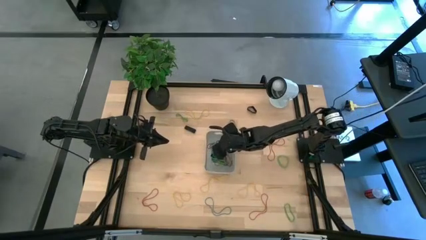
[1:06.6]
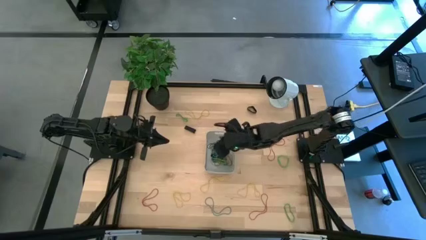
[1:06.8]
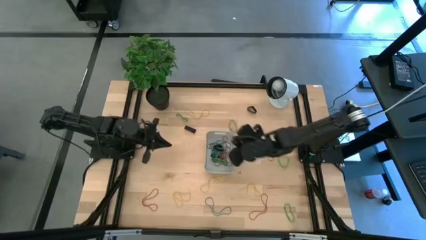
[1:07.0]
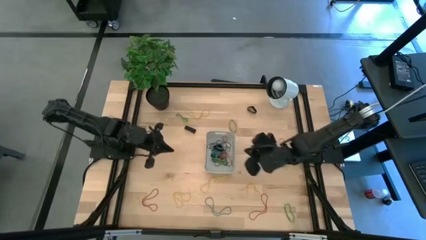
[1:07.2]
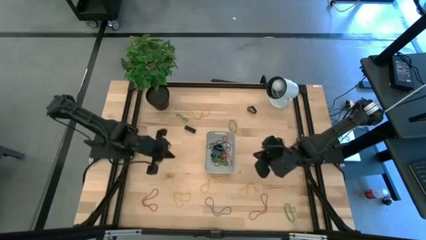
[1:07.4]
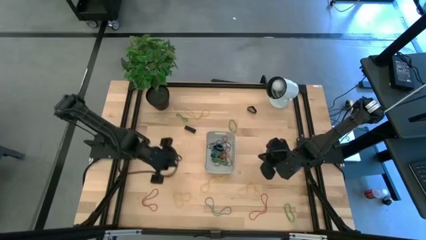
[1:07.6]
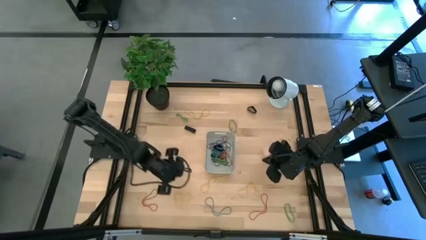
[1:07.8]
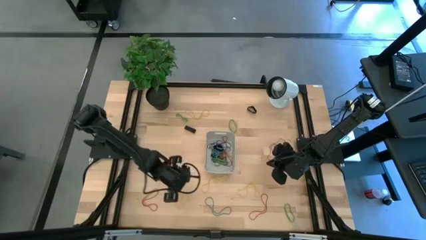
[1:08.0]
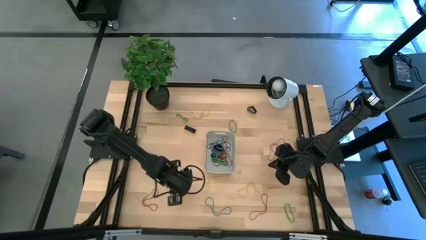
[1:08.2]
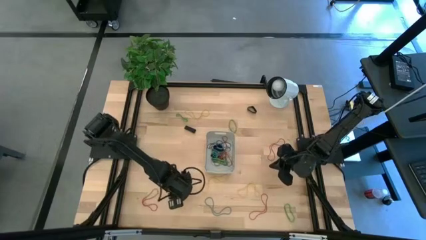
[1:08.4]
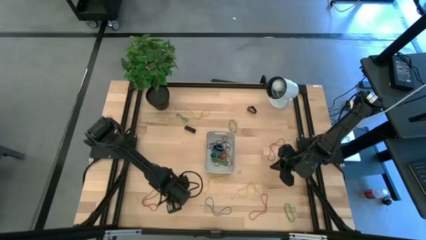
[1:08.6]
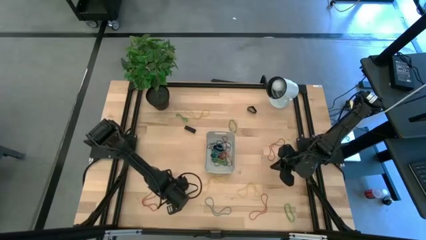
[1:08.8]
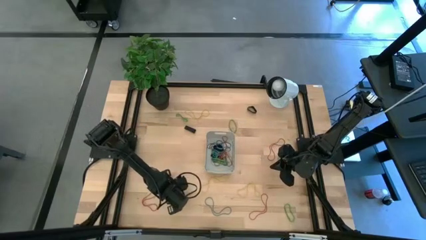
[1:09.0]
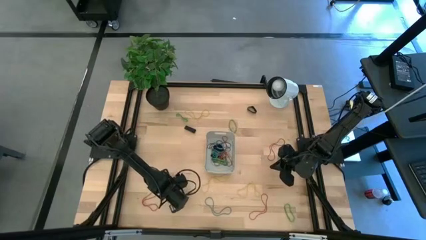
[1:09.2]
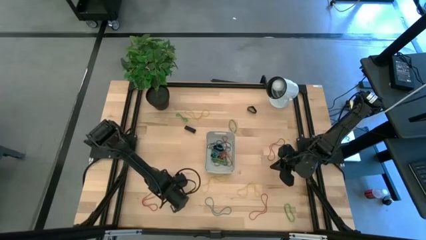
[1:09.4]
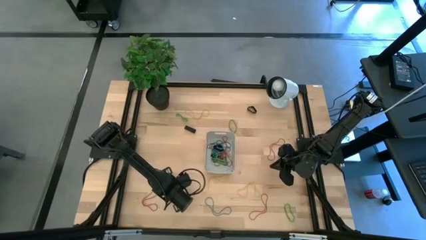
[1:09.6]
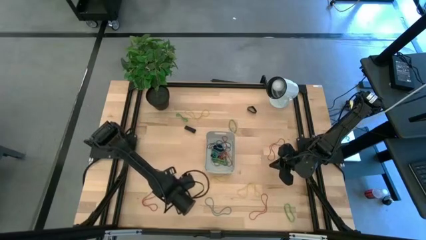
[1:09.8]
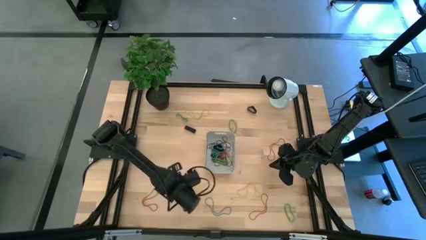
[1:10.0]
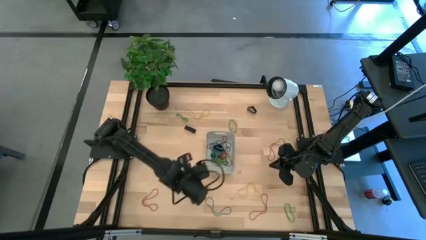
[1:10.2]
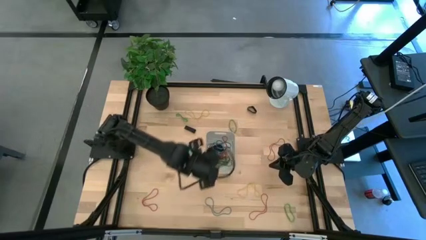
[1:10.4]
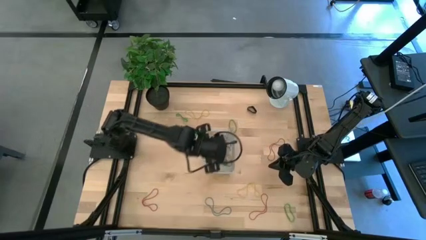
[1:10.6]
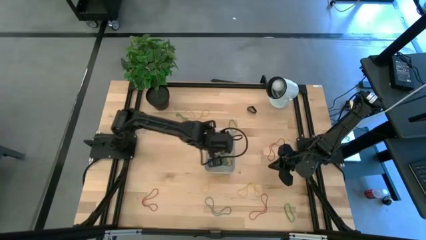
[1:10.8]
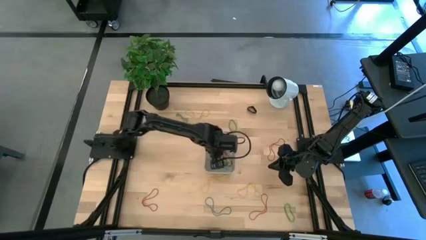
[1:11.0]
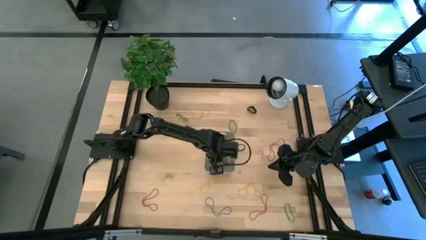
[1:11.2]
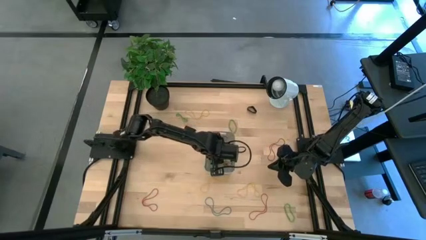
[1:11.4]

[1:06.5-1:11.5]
Task: Pick and place rubber bands into bin
Put the yellow rubber band into the gray bin

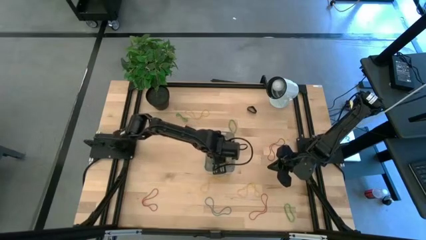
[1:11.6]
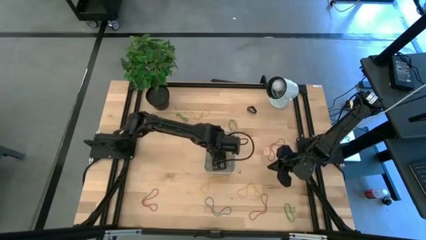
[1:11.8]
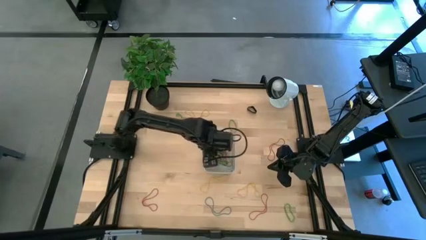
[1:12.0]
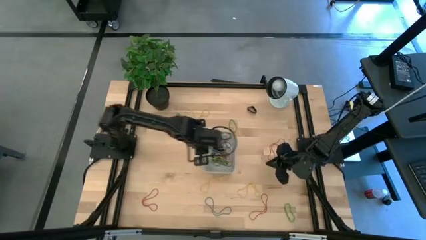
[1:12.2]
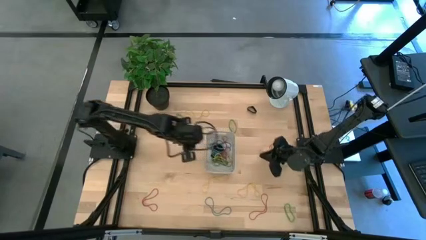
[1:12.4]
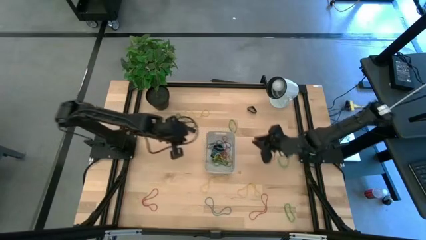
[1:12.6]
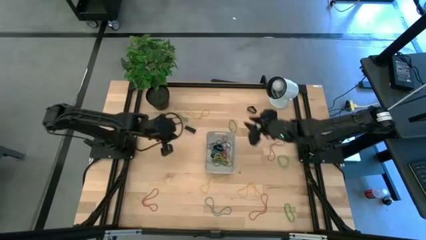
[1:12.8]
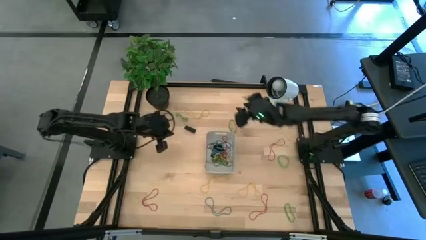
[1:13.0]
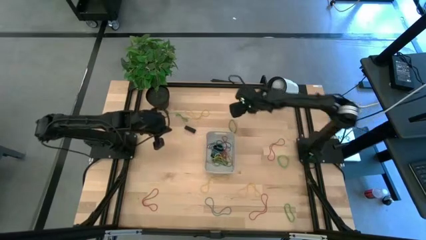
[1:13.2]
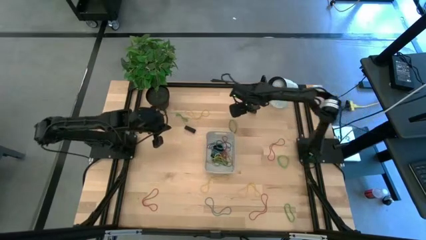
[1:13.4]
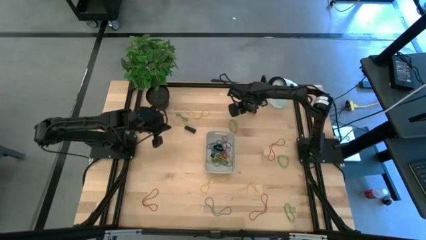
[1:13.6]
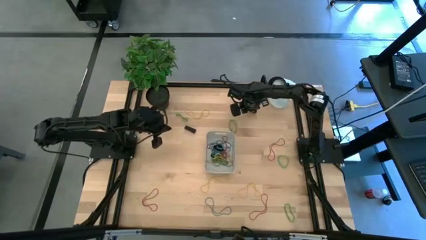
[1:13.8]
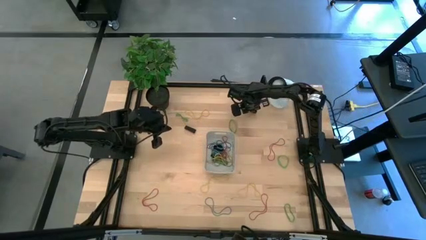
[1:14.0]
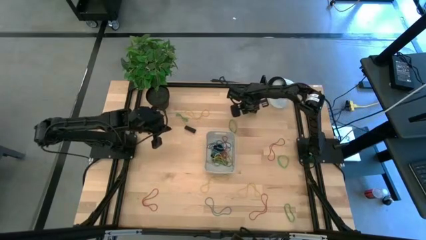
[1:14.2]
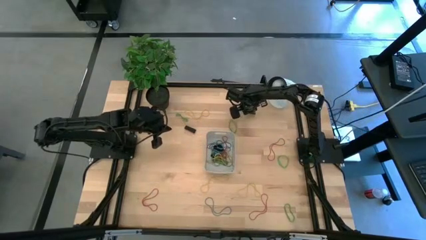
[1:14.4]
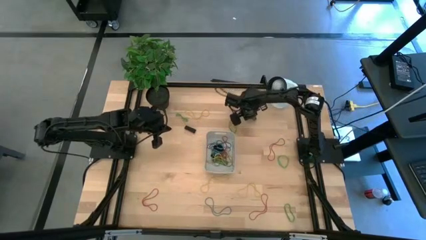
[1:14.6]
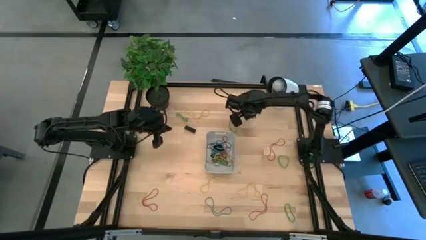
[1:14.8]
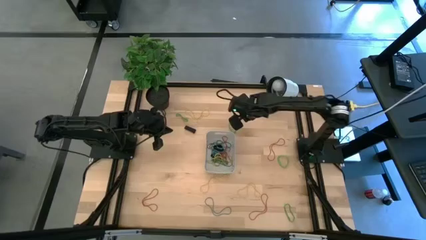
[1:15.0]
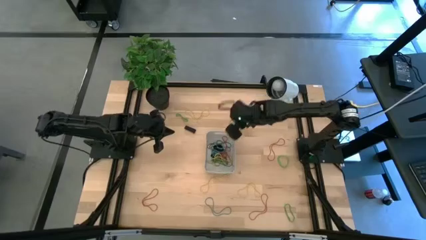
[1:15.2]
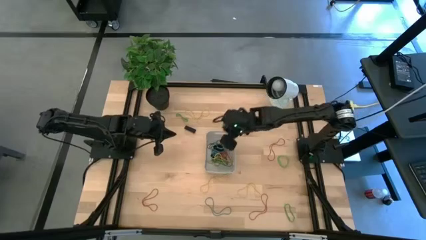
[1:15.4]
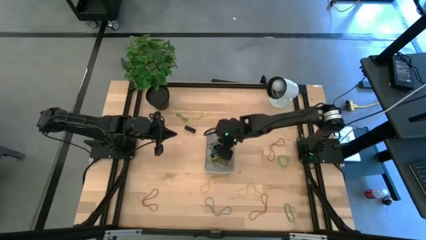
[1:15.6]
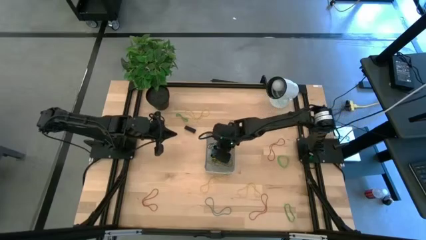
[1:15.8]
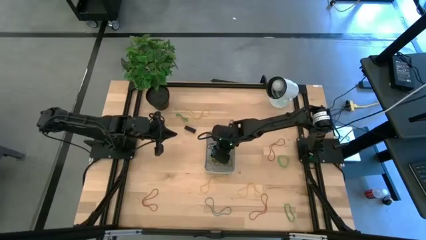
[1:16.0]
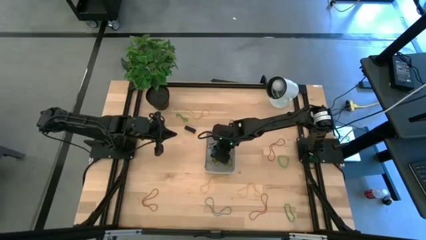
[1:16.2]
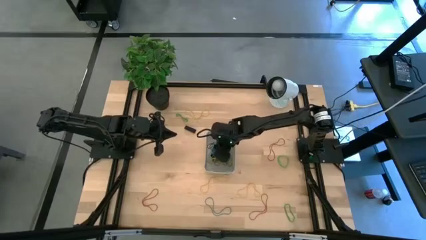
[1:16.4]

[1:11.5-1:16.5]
Put the black rubber band into the gray bin

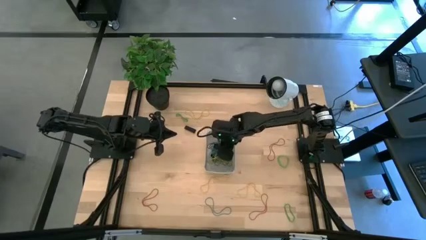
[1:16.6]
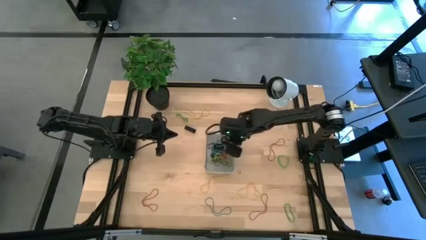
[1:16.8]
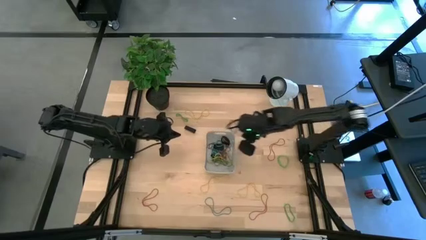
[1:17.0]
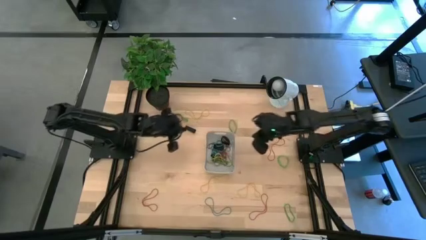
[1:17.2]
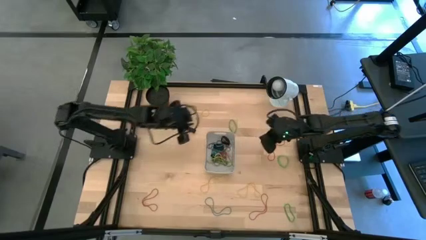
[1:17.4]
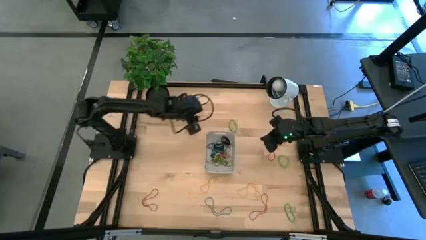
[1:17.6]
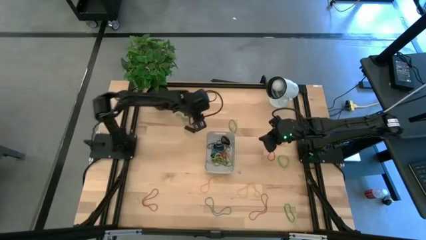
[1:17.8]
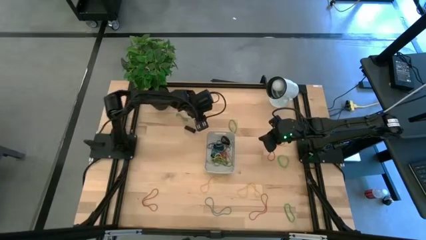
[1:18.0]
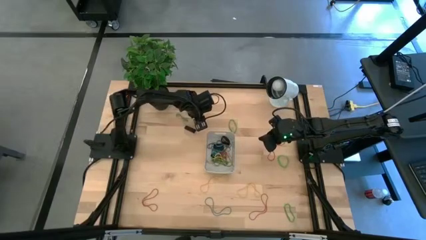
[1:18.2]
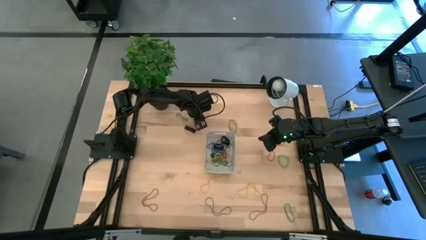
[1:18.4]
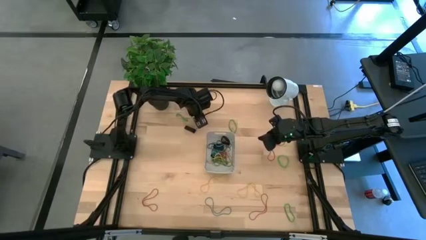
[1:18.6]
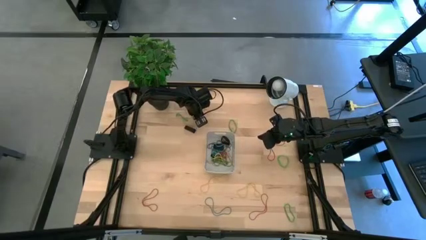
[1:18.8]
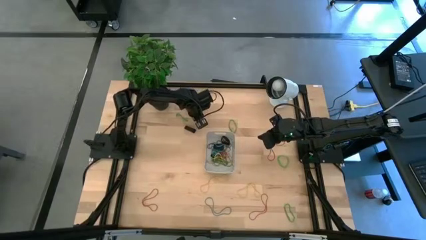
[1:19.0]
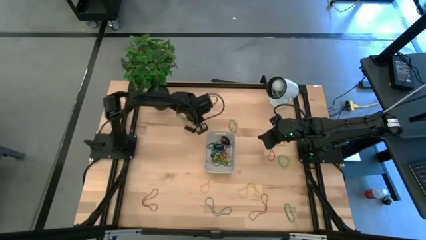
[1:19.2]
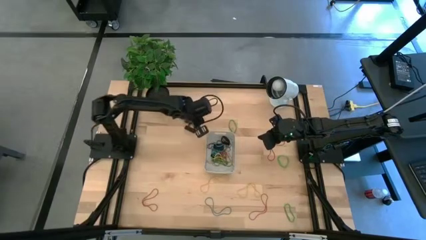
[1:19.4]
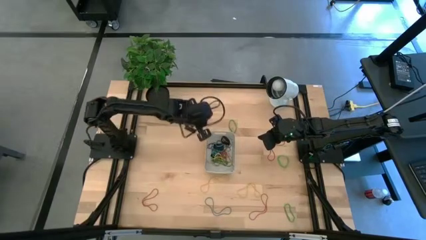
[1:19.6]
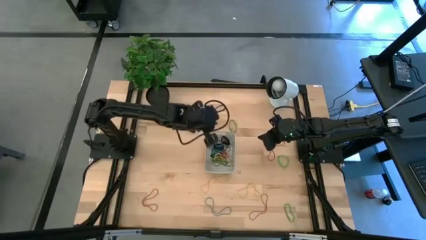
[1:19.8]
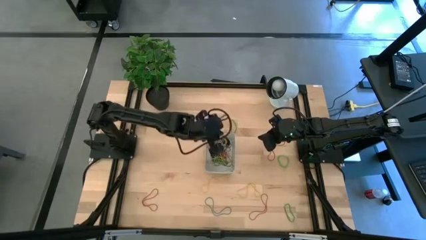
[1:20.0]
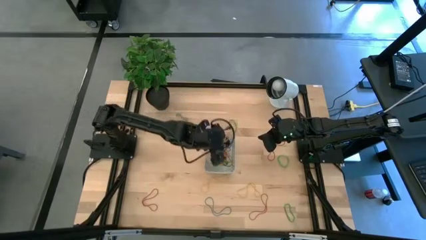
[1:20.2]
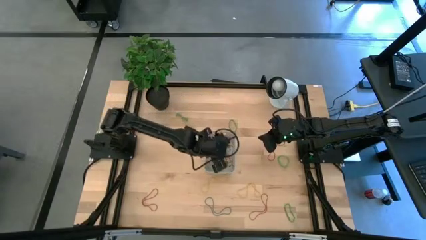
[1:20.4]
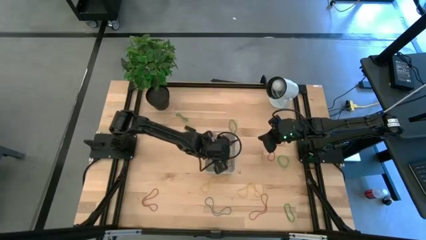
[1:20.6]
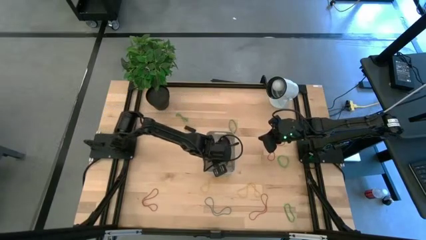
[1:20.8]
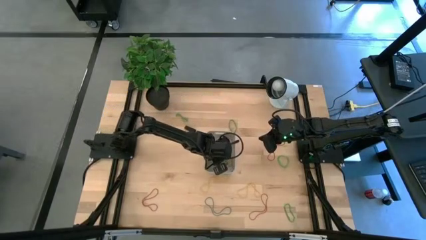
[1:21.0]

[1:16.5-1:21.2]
Put the yellow rubber band into the gray bin

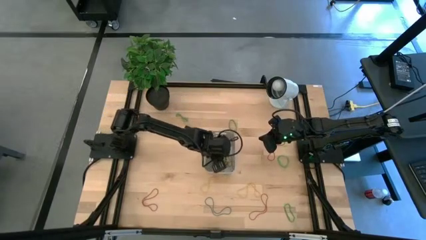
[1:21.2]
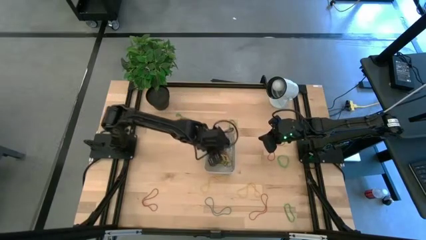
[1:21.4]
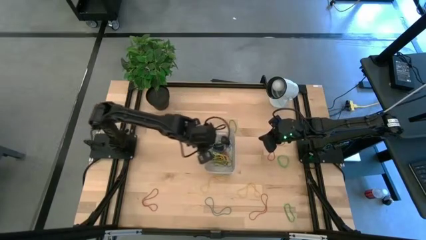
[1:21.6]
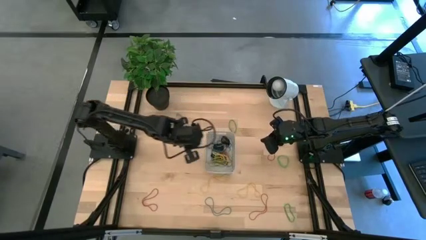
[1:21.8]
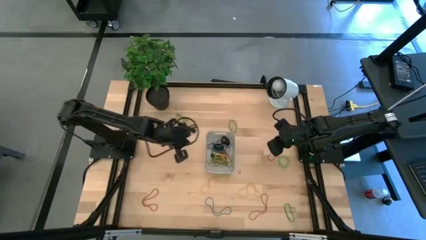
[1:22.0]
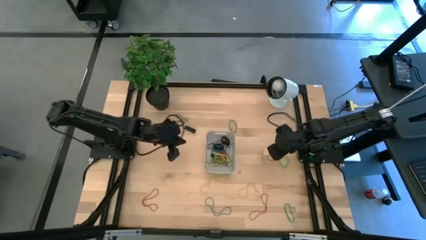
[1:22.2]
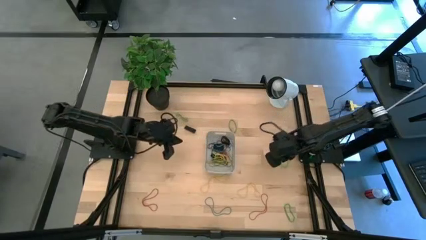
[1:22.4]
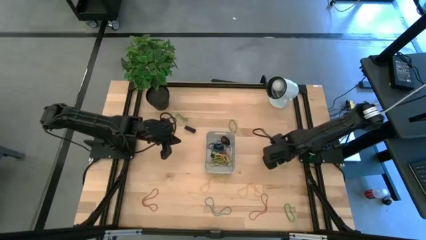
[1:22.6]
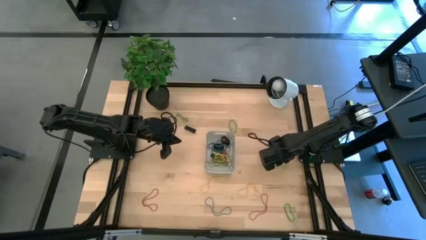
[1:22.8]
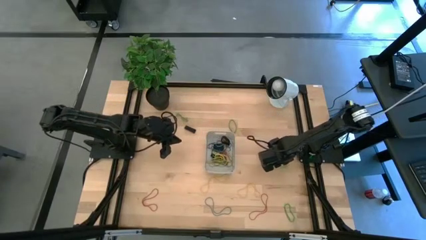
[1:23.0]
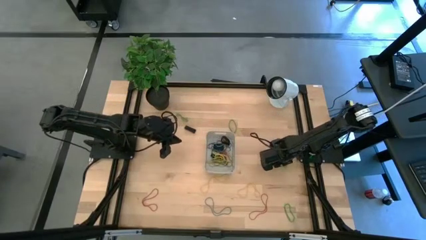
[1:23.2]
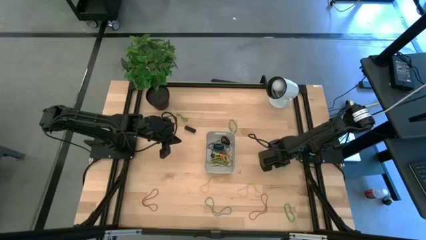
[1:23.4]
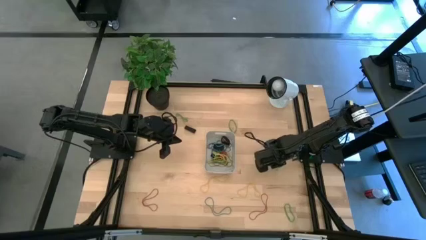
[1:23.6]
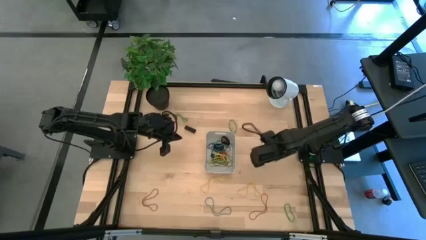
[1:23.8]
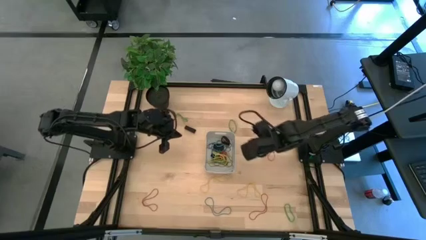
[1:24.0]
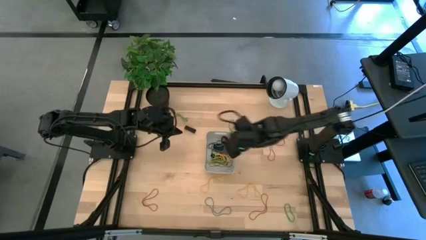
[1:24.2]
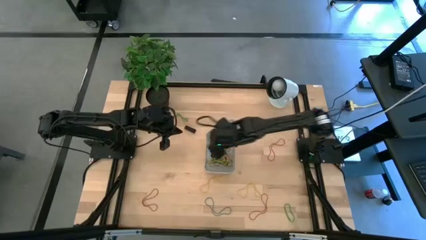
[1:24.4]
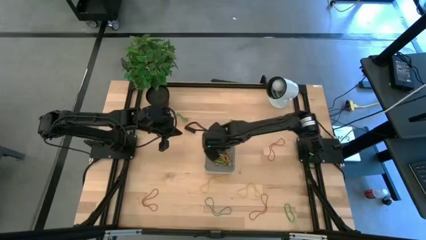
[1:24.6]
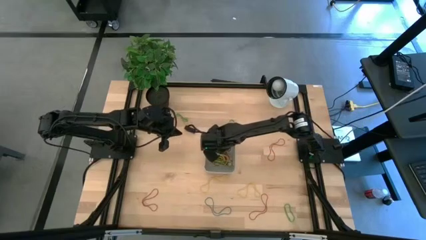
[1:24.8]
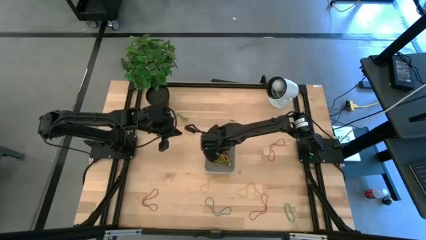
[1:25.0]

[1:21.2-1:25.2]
Put the green rubber band into the gray bin
